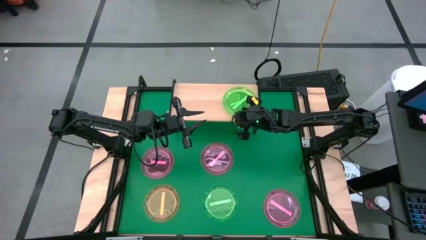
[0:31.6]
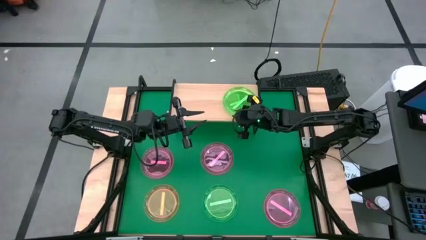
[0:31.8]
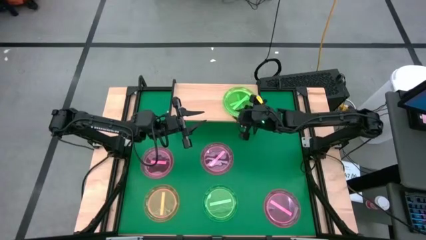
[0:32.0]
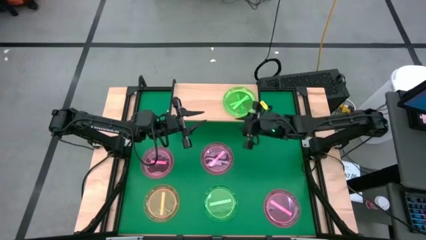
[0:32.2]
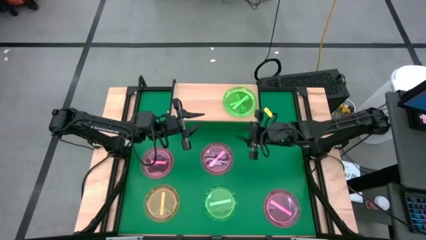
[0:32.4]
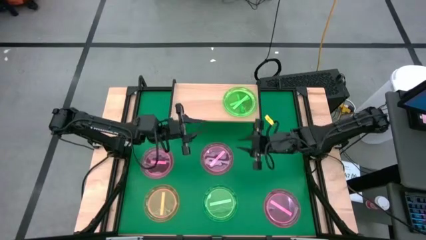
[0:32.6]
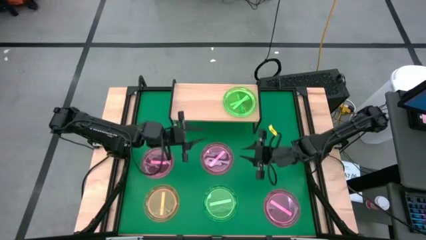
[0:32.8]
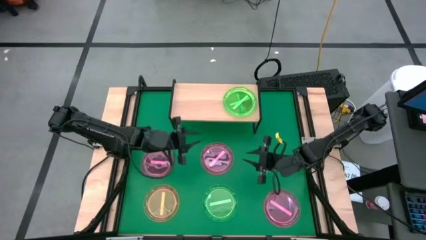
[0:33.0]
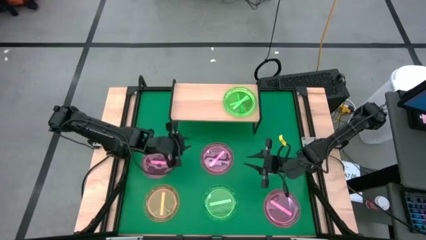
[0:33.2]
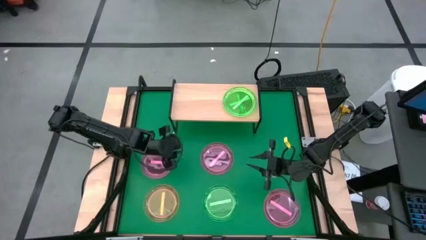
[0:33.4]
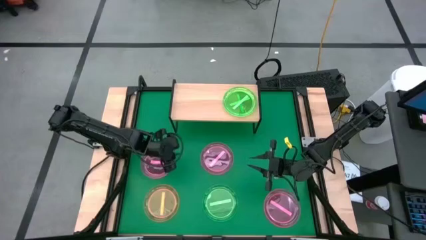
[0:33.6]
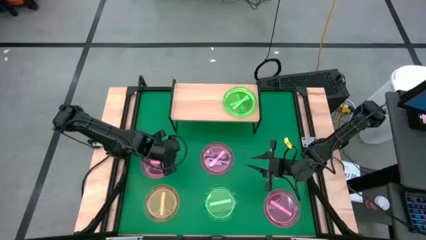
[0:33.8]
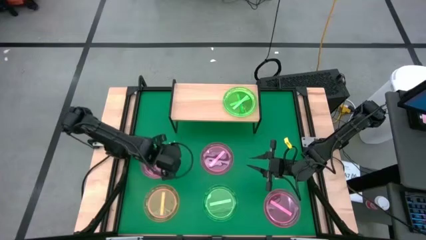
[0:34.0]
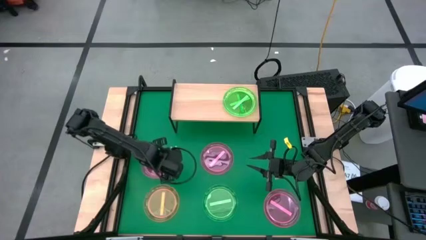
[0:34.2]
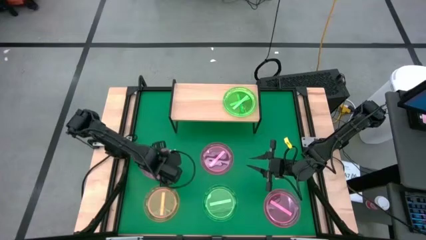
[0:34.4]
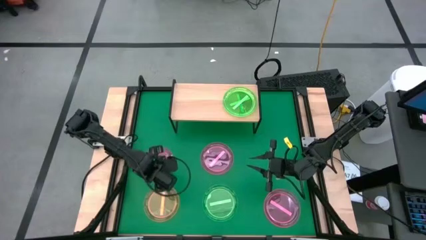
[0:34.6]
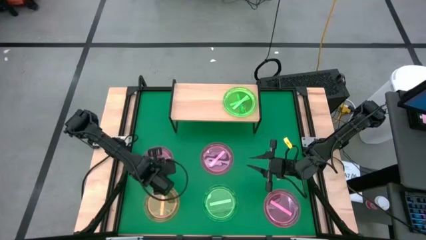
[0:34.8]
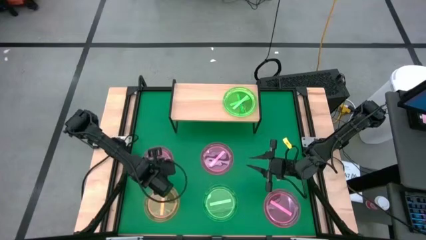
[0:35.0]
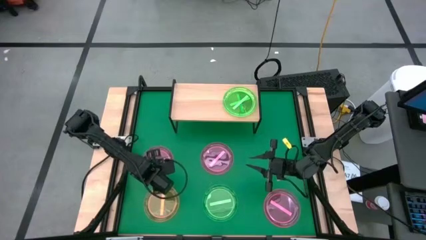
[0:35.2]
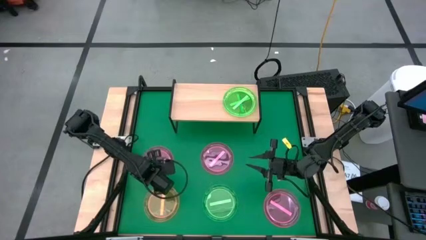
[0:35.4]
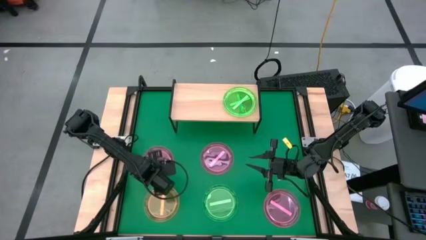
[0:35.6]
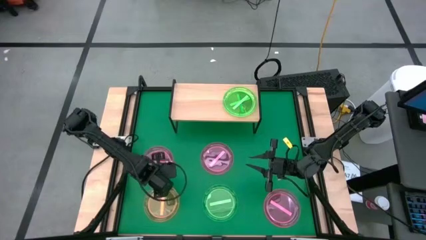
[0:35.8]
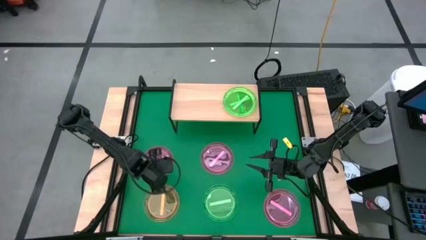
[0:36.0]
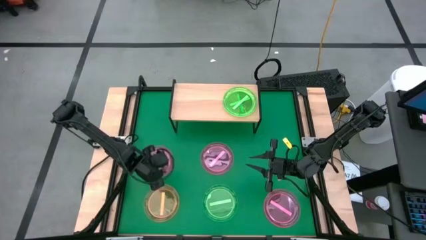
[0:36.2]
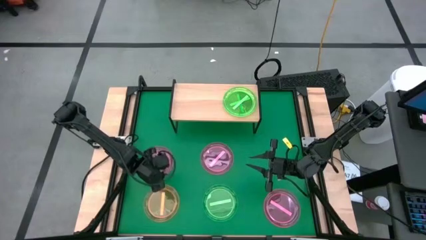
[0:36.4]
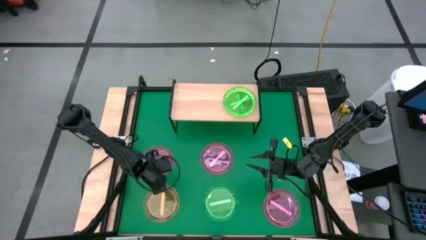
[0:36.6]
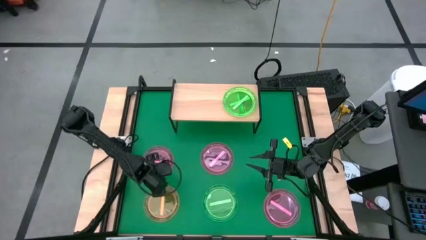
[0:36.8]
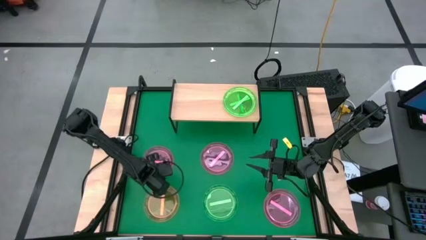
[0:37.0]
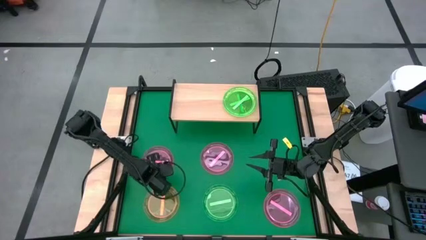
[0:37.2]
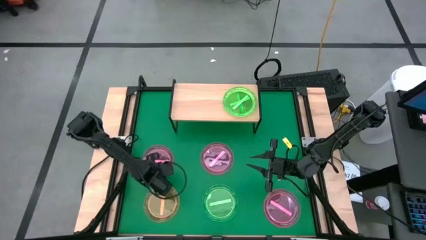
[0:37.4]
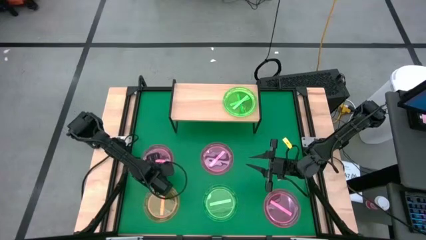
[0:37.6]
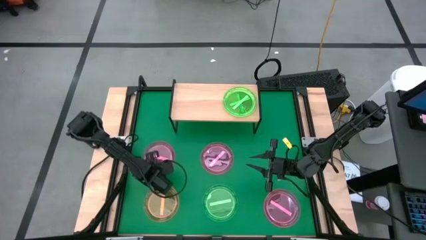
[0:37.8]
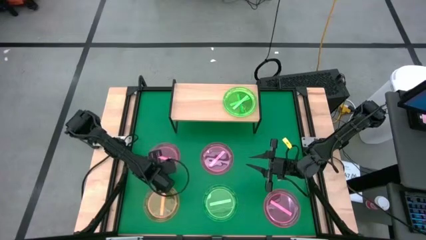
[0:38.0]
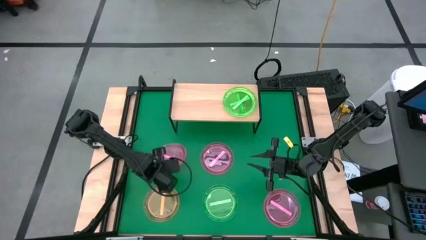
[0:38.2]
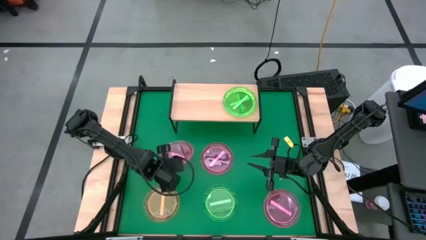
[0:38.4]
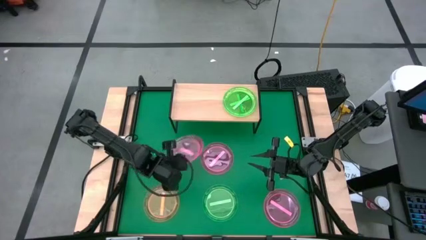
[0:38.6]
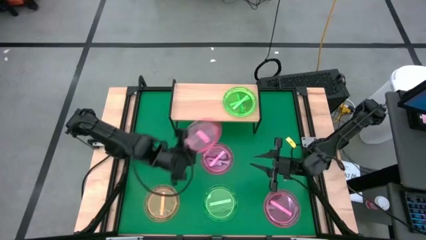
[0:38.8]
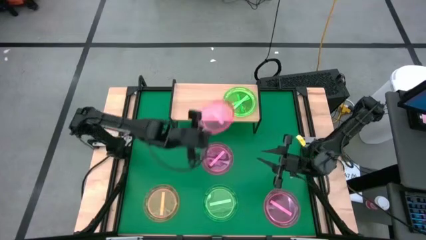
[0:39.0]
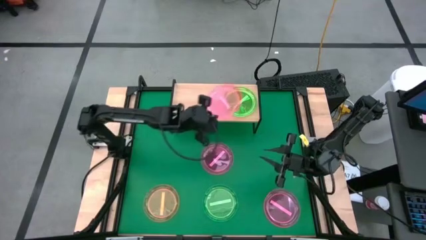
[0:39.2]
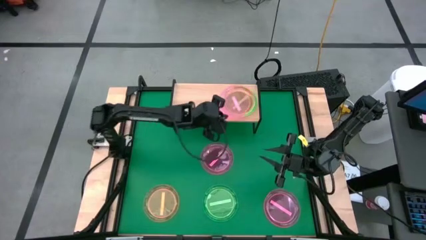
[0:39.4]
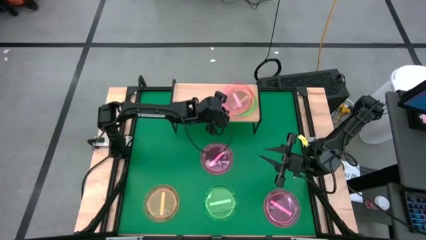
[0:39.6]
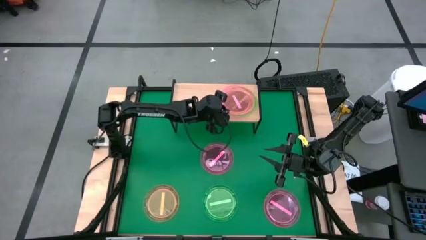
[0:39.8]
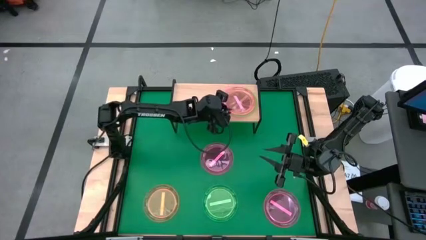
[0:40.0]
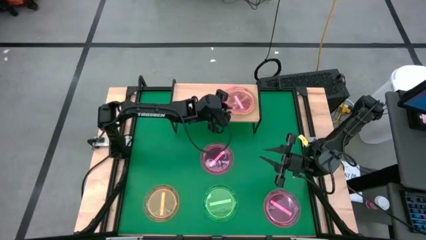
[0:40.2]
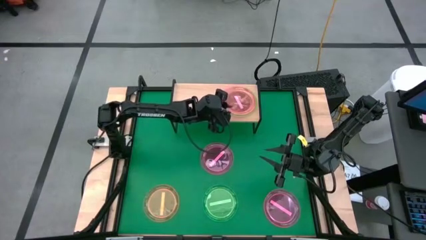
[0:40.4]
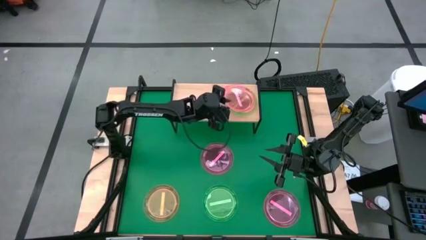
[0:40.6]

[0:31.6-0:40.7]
Task: Place and stack plates onto a shelf
Stack the pink plate on top of the green plate on the shelf

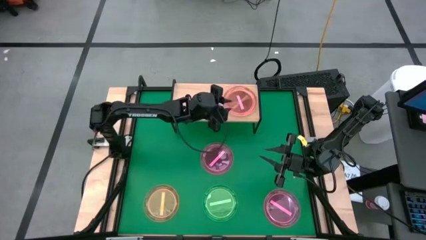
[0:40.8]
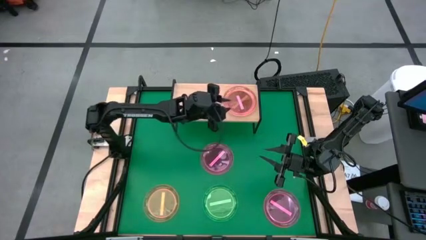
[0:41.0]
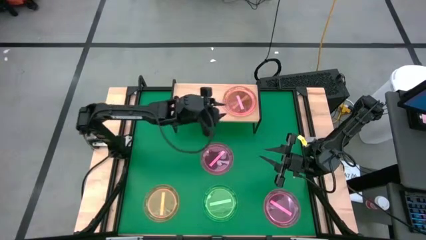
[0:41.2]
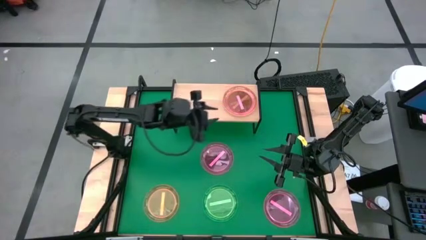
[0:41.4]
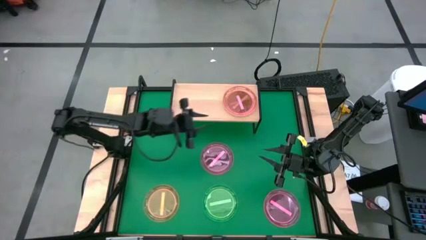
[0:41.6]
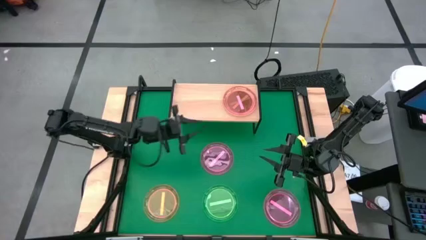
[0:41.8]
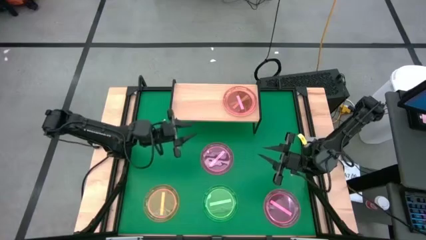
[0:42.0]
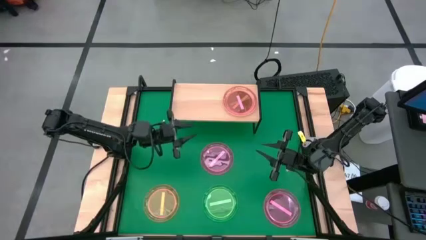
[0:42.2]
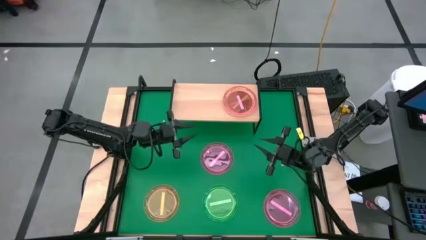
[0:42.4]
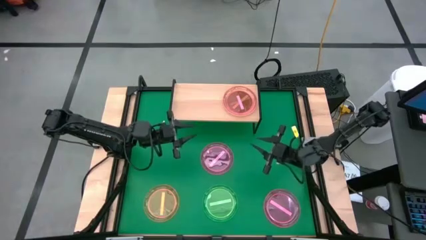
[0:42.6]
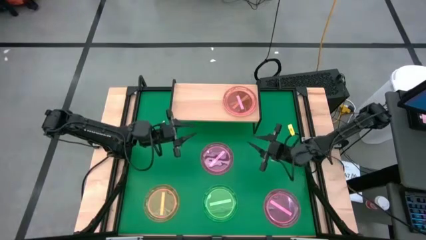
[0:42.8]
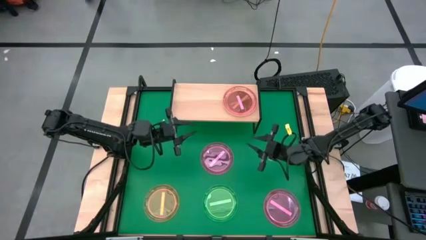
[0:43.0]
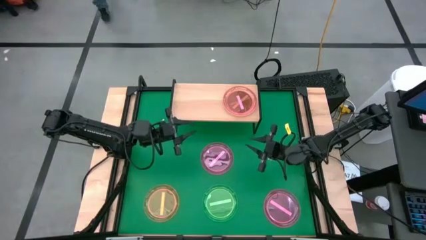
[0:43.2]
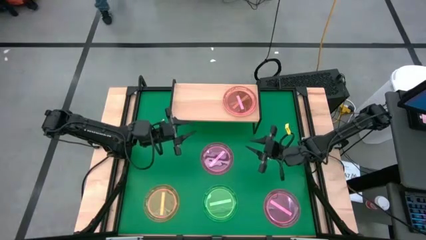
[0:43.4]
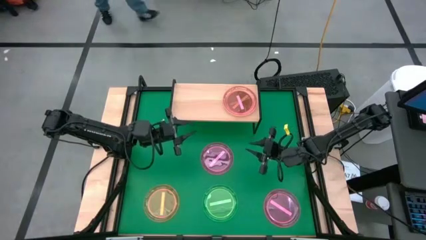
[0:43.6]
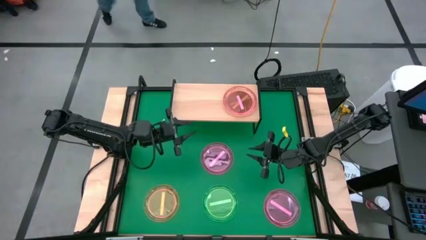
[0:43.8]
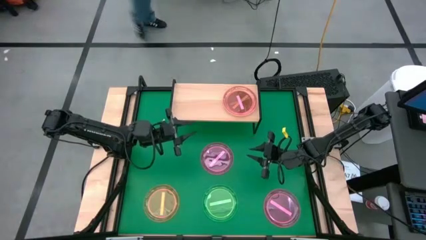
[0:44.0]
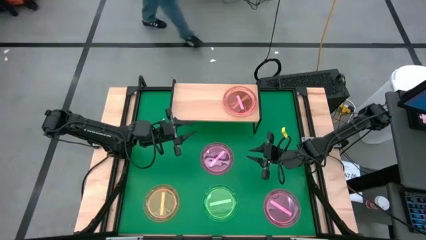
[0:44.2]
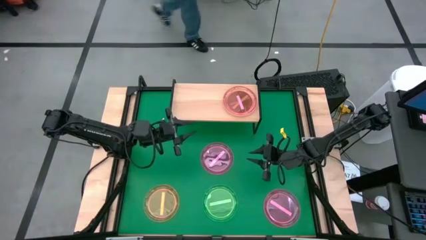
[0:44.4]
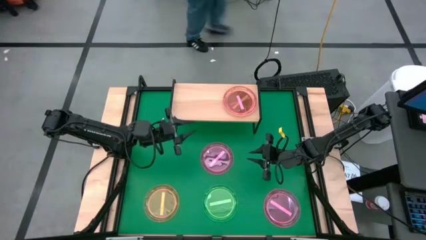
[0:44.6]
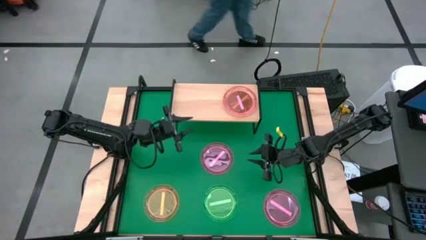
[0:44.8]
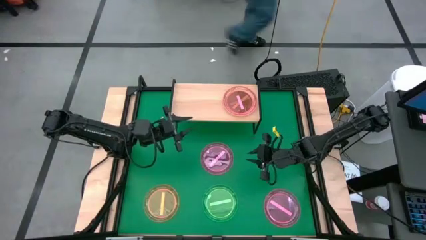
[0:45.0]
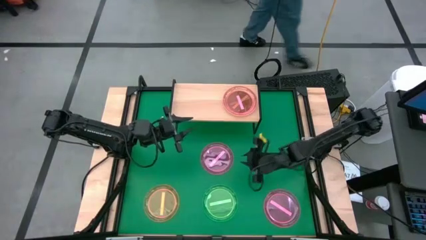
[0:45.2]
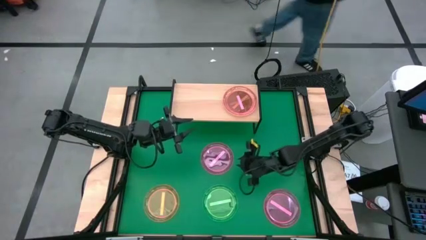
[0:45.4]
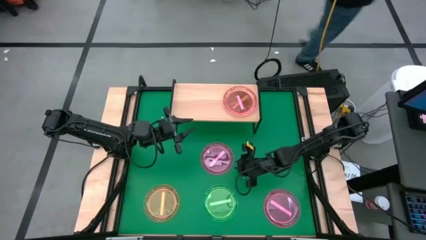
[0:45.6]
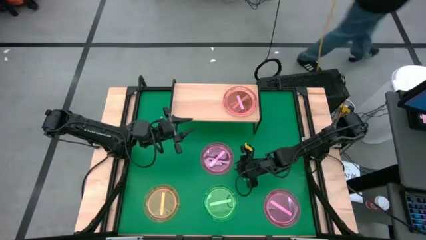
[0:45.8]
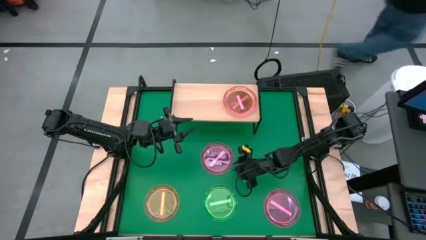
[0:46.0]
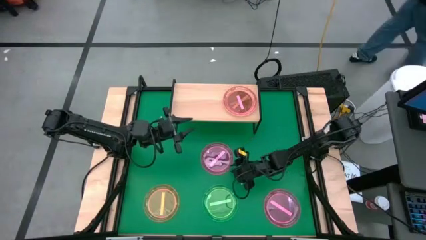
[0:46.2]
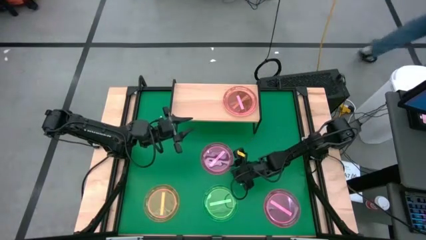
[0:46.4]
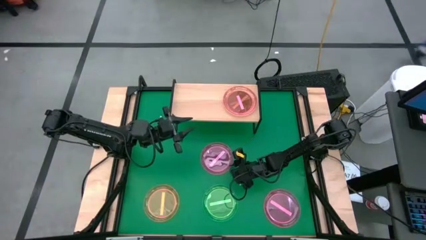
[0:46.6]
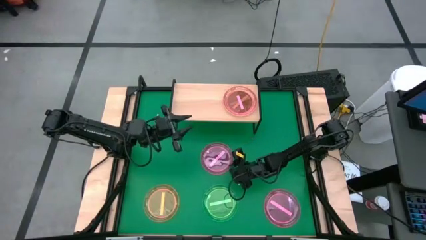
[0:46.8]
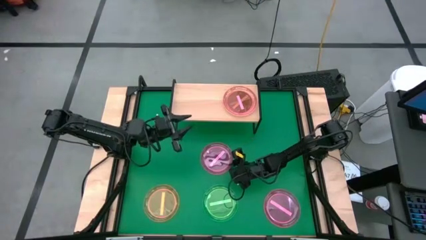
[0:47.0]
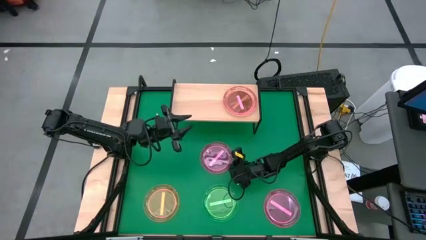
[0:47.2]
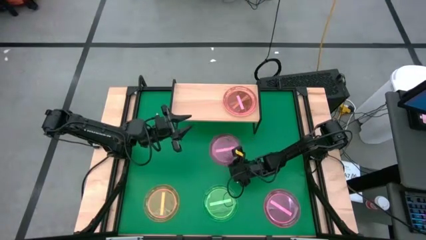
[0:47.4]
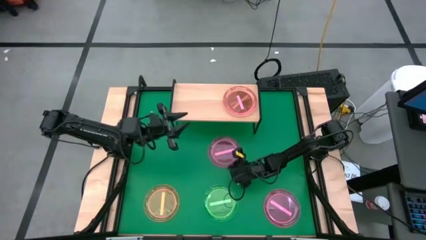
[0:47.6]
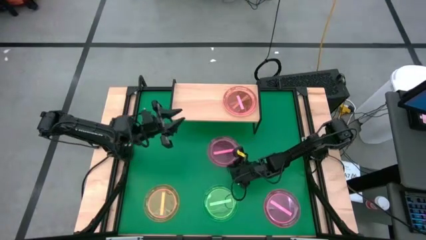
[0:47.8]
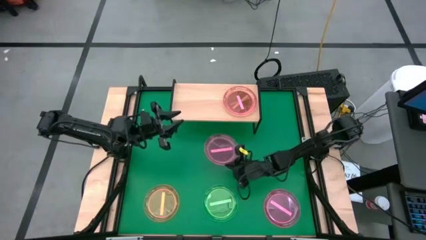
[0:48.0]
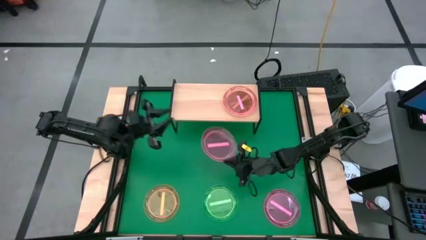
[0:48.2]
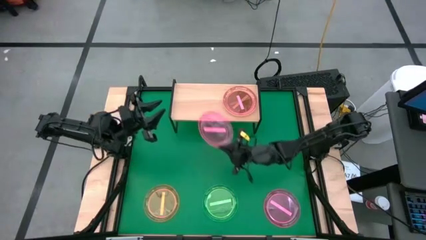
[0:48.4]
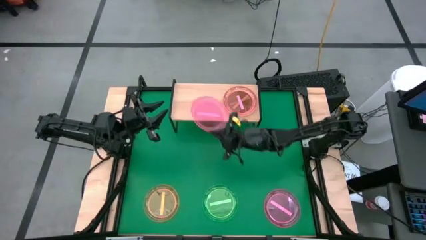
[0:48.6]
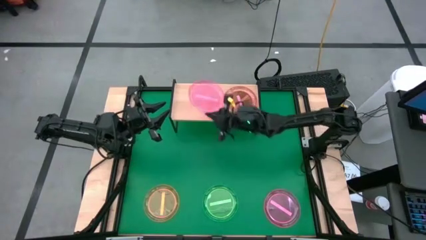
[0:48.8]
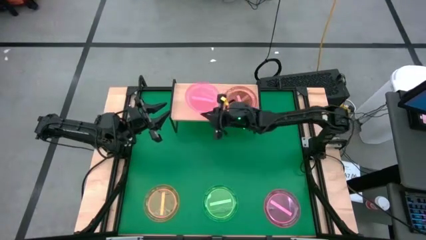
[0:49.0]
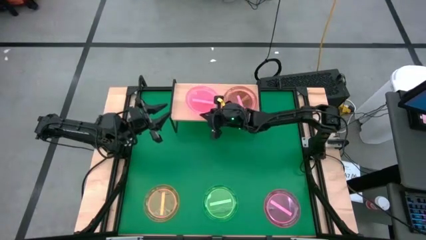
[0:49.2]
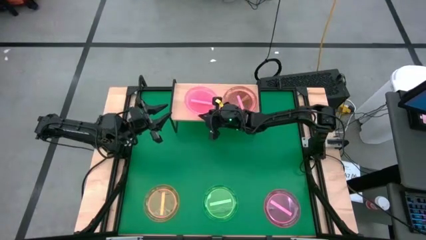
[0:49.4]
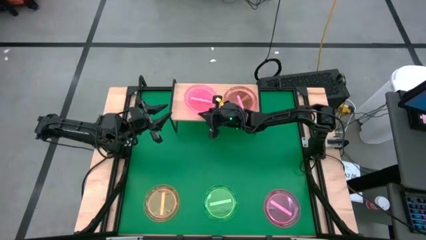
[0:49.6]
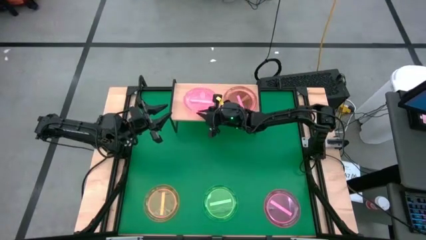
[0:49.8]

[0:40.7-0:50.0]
Put the pink plate on the shelf
